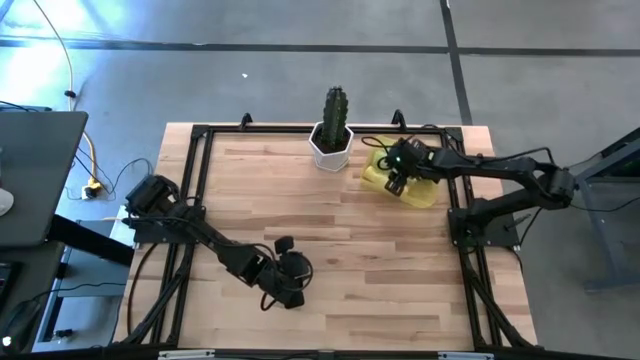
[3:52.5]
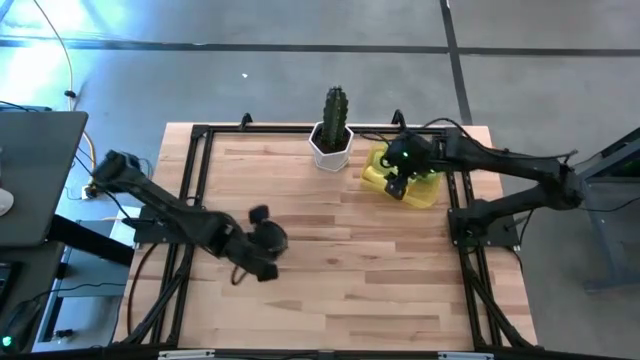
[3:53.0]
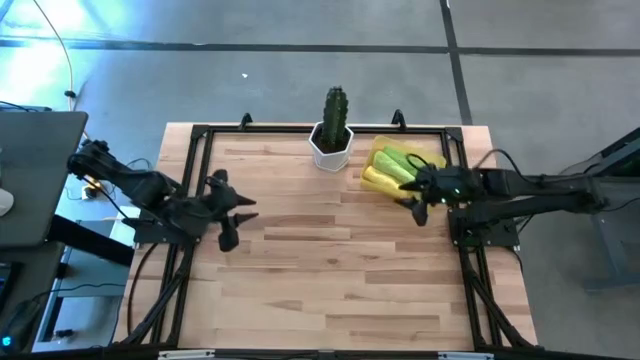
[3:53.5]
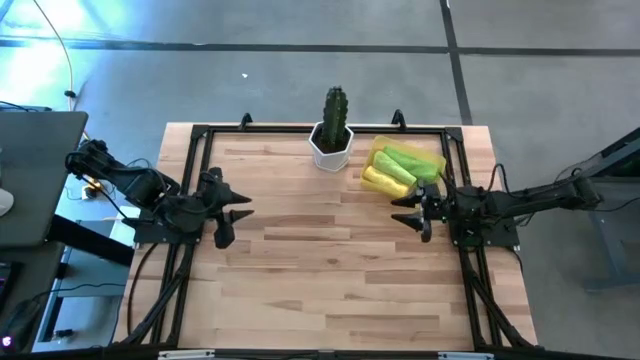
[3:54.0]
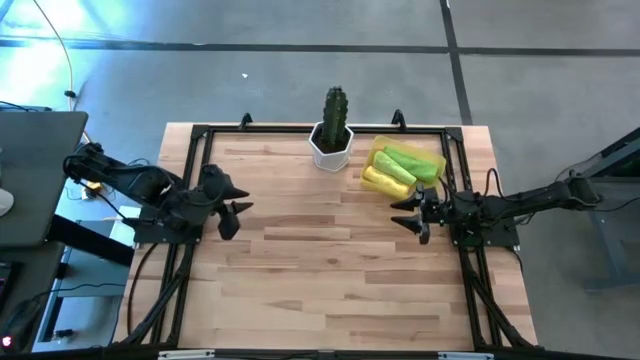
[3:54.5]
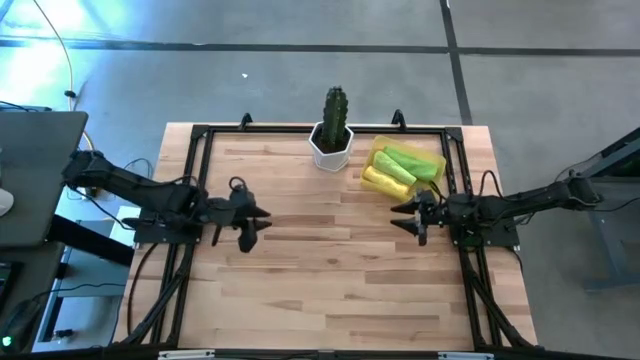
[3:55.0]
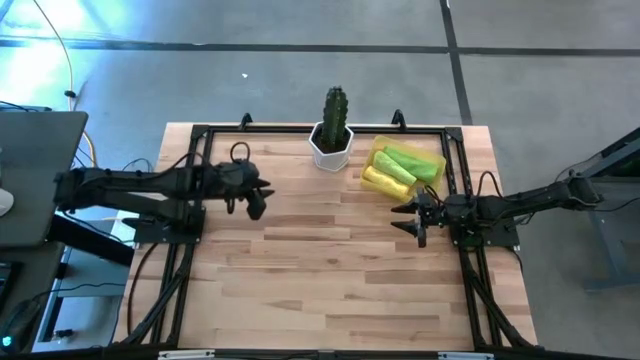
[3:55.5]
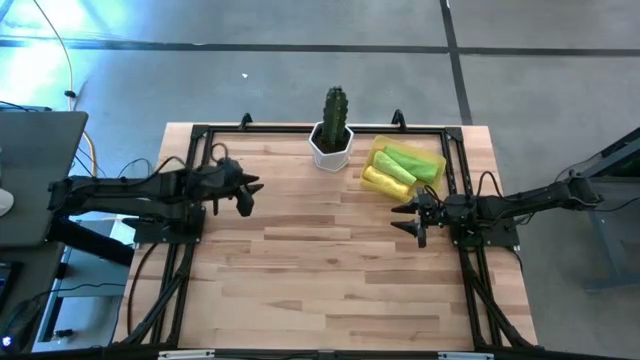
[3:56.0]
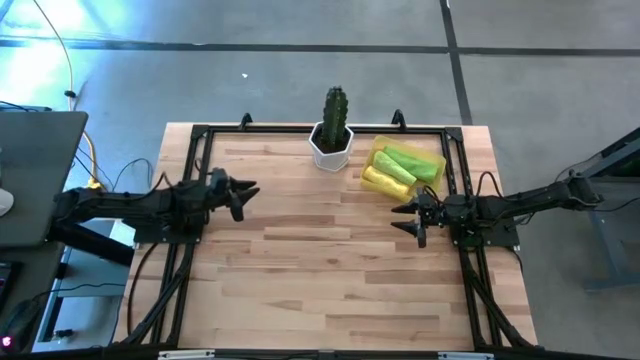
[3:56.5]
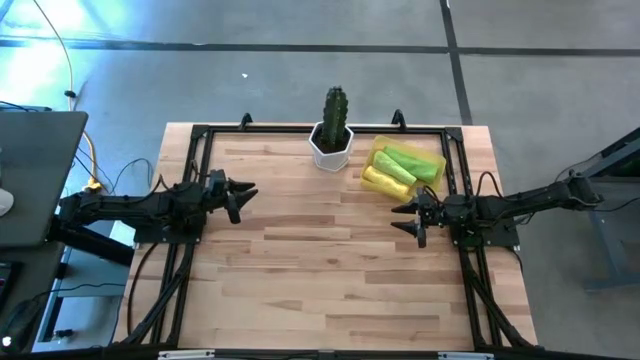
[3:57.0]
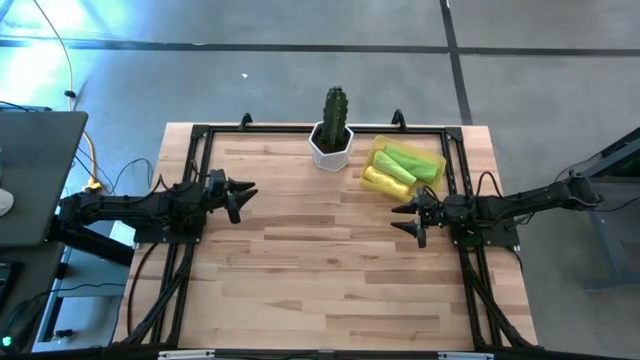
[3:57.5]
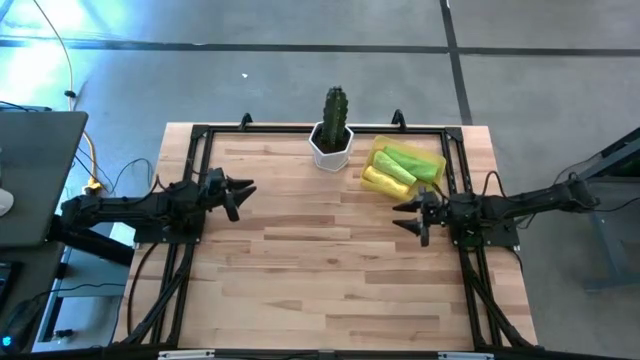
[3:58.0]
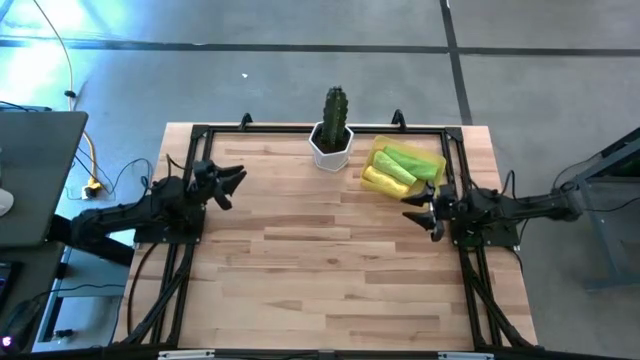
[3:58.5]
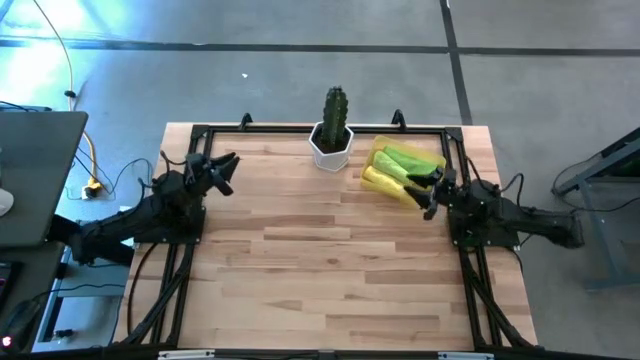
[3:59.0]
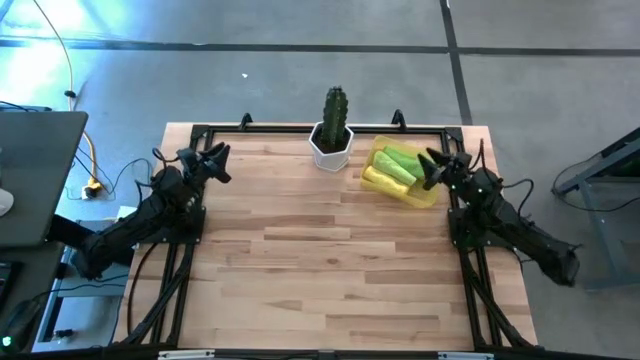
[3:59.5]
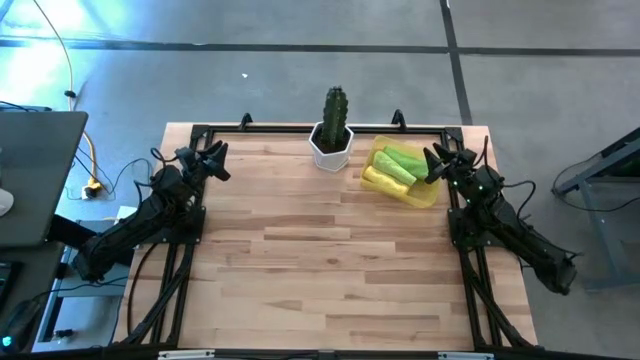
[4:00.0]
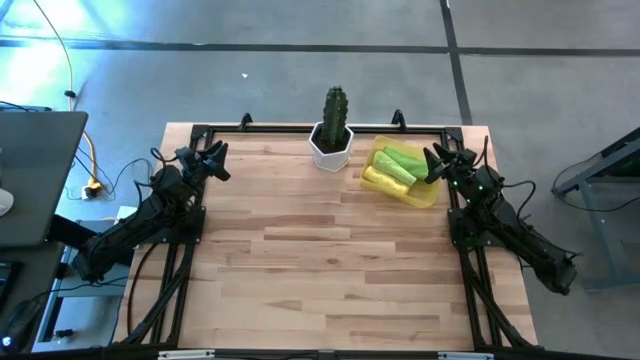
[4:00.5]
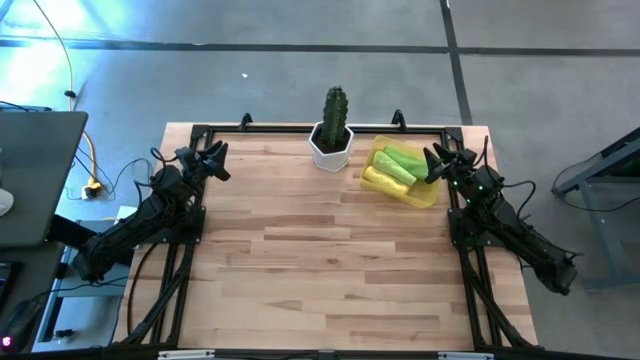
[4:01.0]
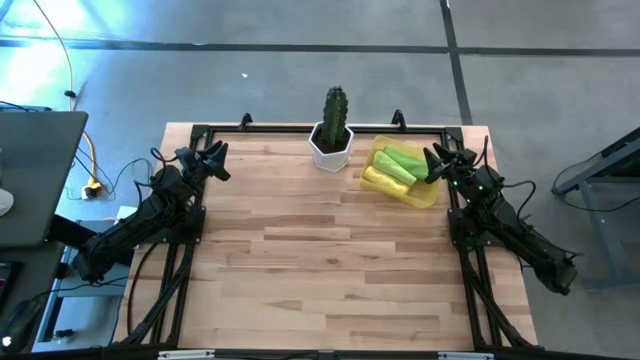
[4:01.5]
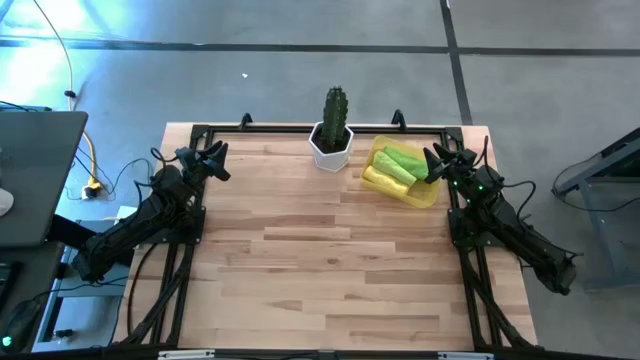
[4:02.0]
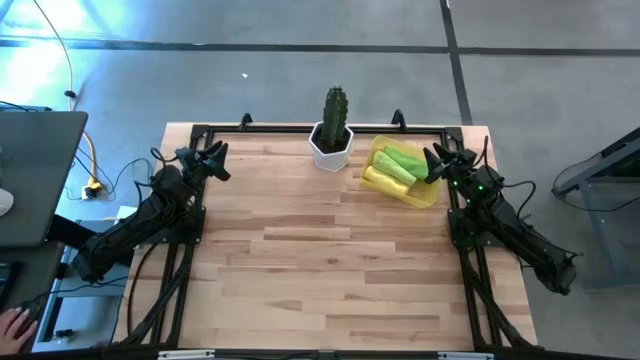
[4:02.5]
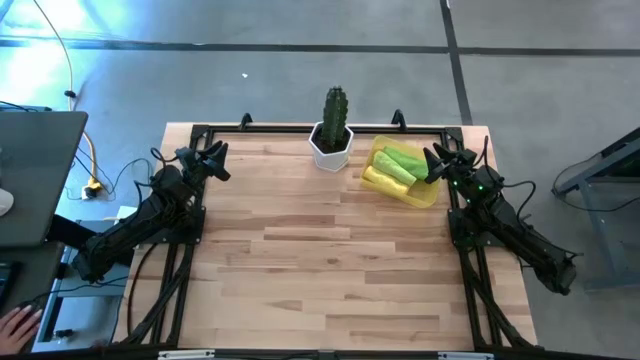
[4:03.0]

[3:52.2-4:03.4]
Task: Roll microfiber towels into tight, uniform cylinder then place into a basket
Return to Home Position

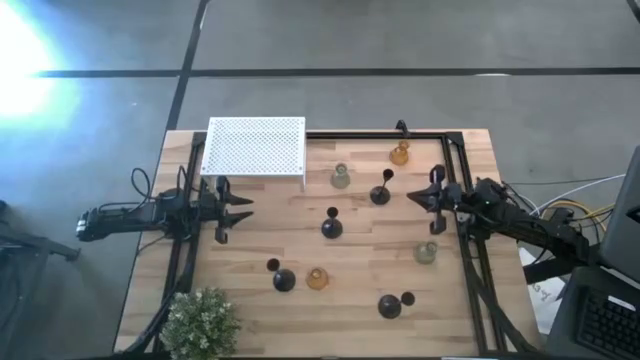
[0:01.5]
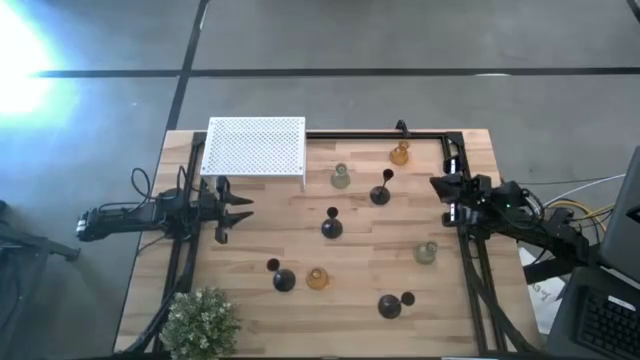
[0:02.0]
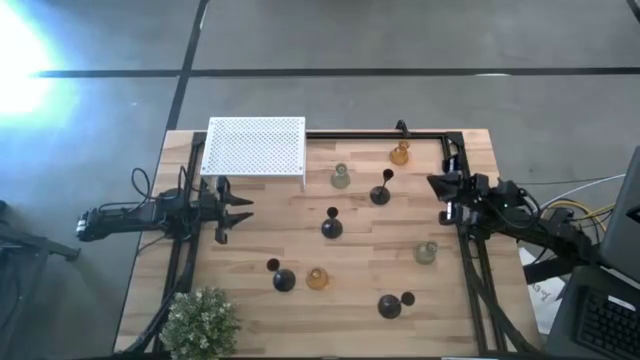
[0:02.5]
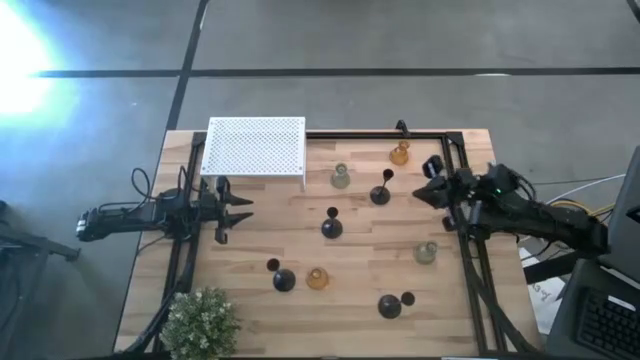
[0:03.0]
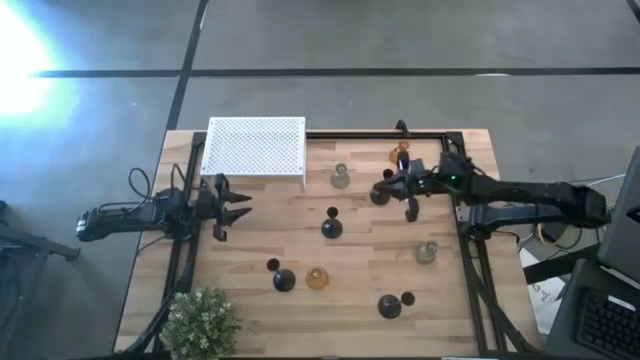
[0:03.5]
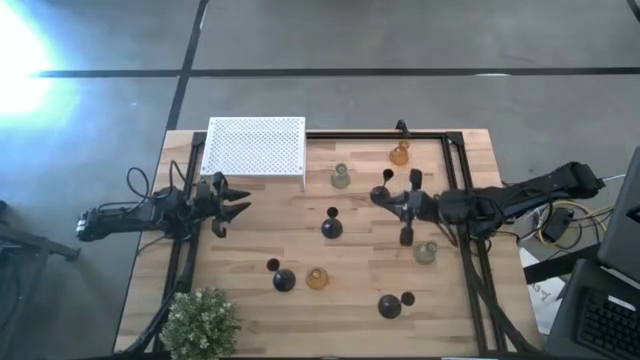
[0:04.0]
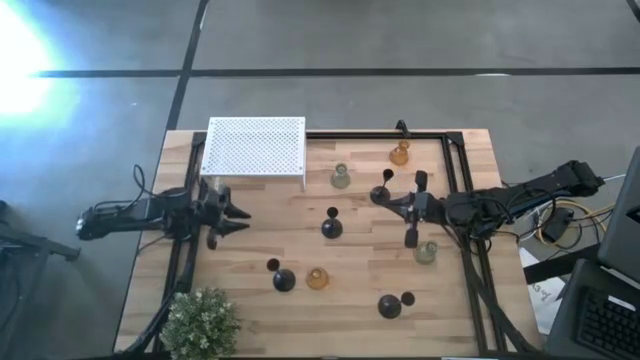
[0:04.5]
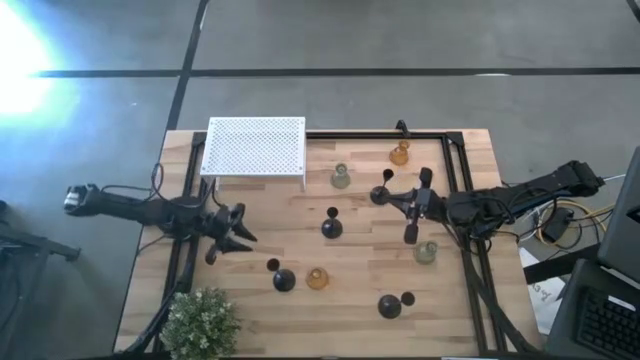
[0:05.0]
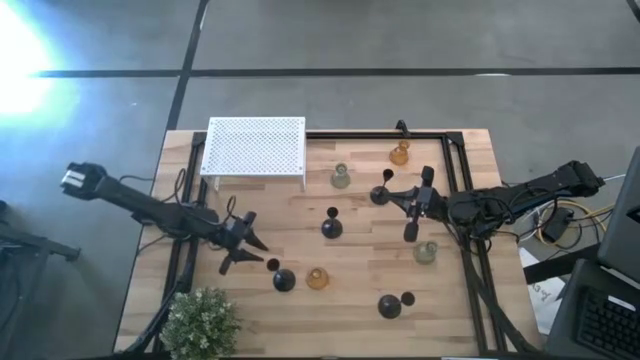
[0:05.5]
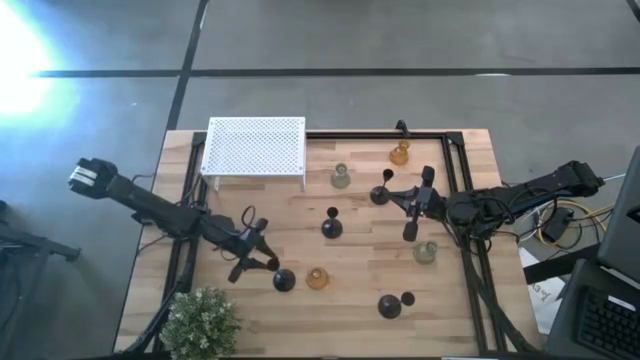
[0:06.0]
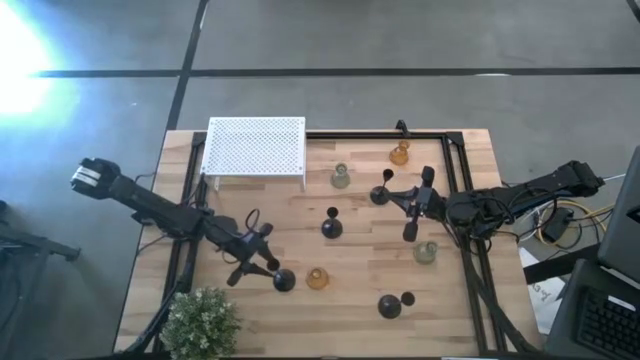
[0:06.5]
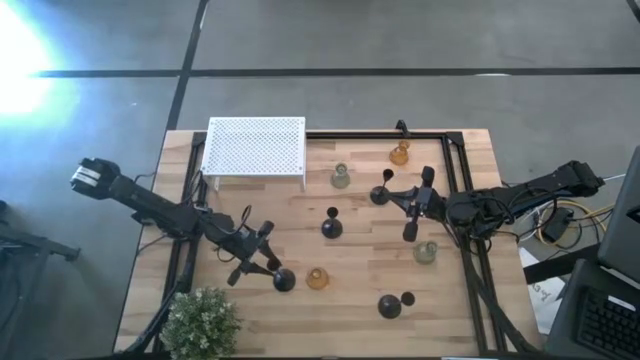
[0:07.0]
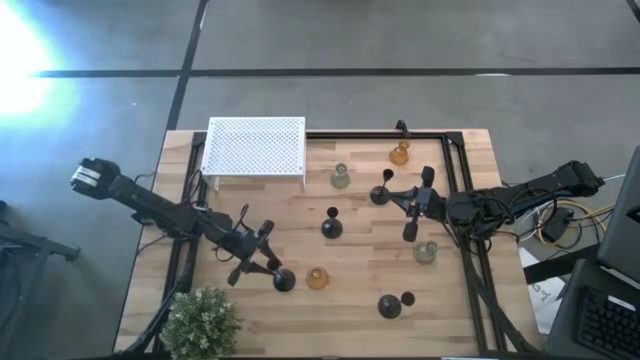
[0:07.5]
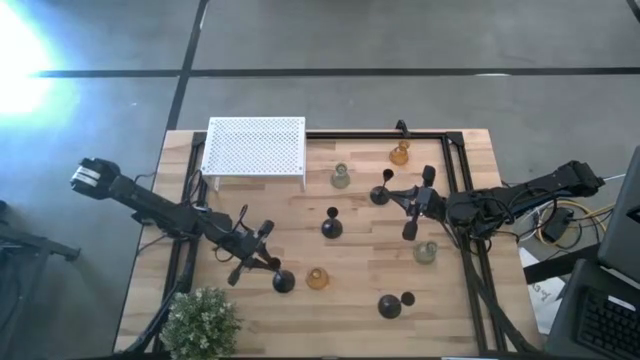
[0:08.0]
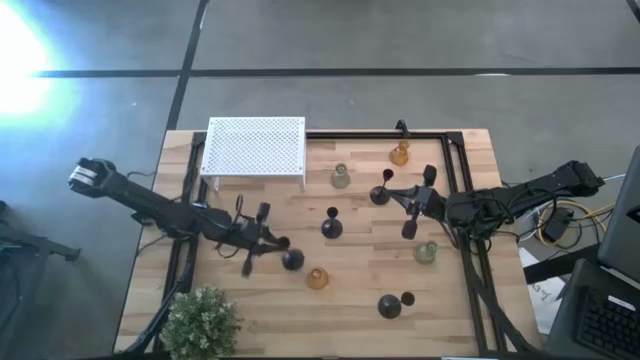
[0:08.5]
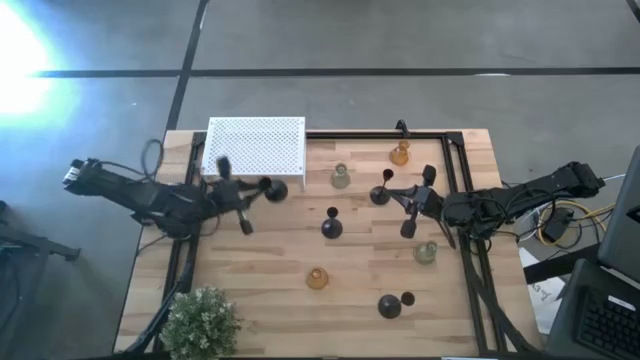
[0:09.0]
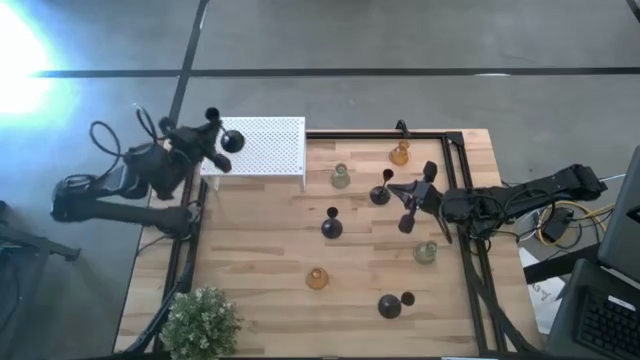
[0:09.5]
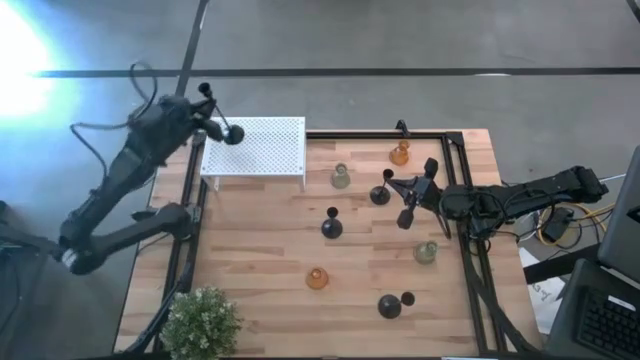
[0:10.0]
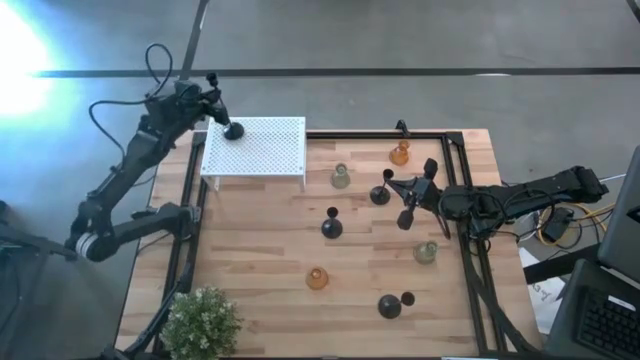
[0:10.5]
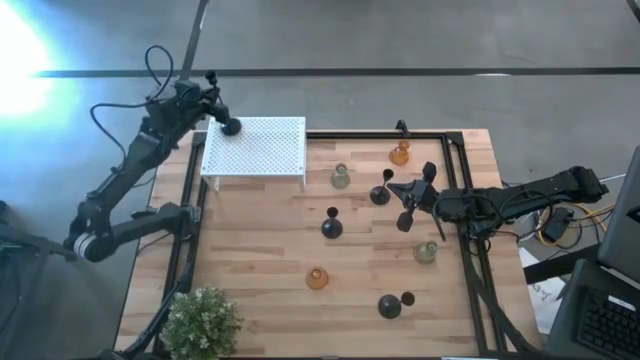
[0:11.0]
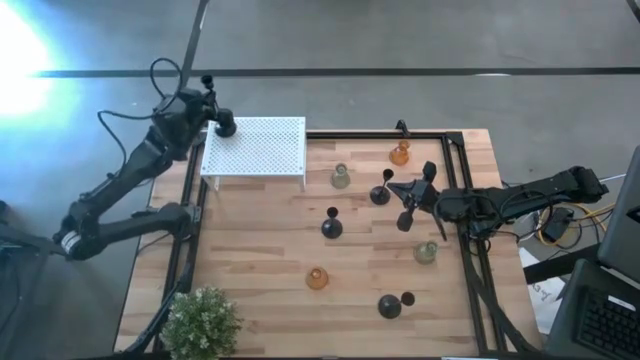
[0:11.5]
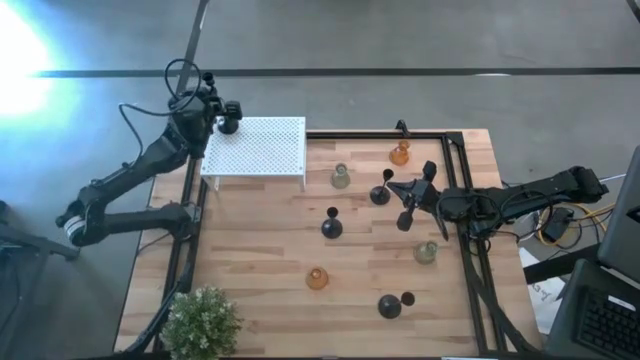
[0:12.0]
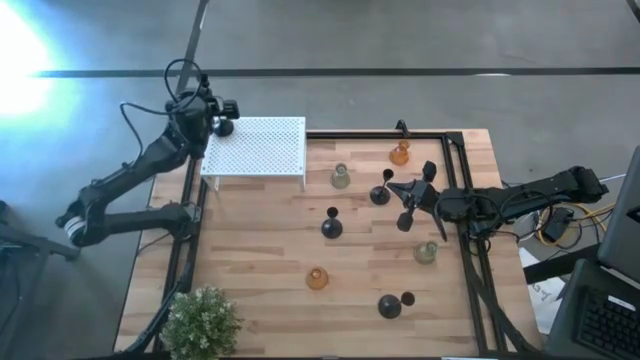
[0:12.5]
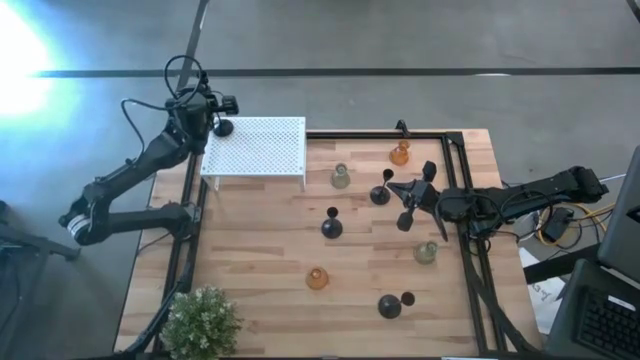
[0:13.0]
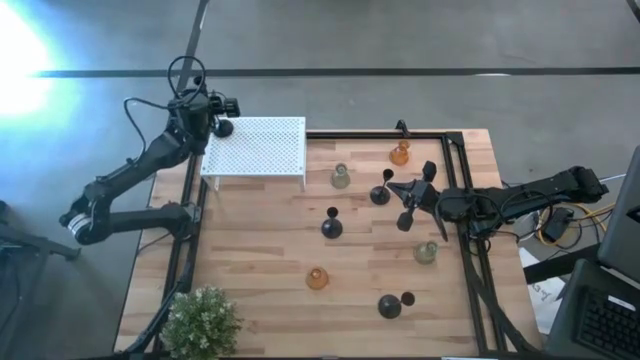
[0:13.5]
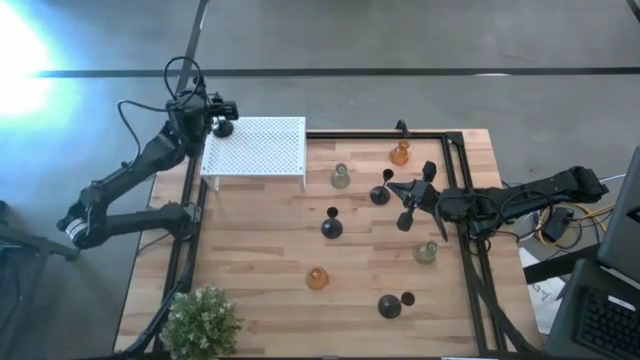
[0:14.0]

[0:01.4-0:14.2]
Task: Pick & Place candle stick holders
Put the left large black candle holder on the shelf
